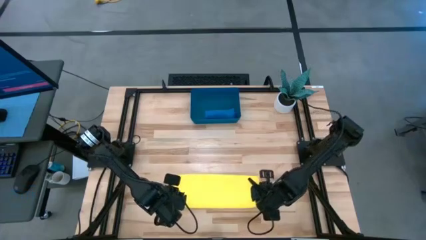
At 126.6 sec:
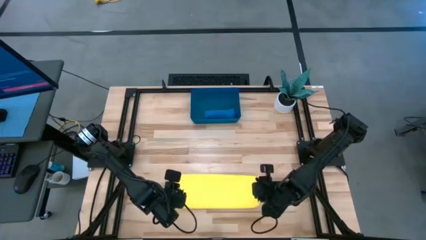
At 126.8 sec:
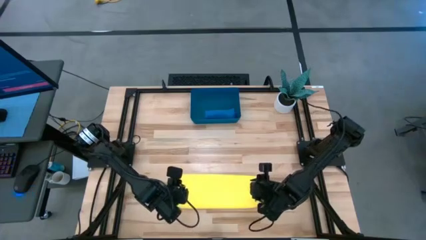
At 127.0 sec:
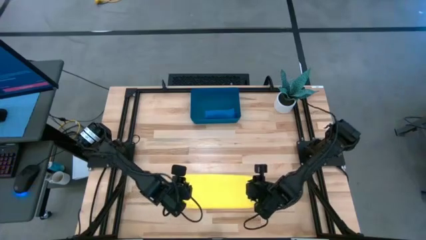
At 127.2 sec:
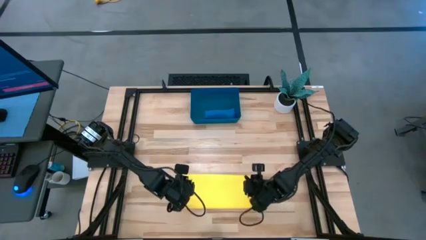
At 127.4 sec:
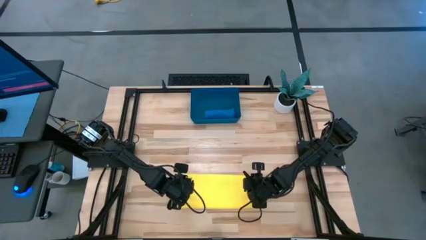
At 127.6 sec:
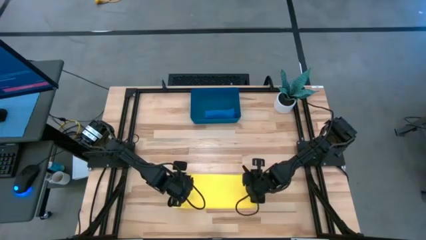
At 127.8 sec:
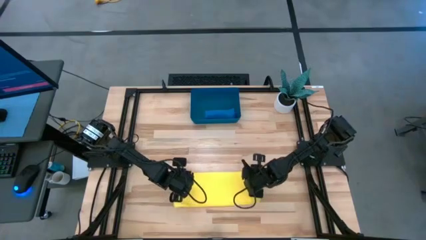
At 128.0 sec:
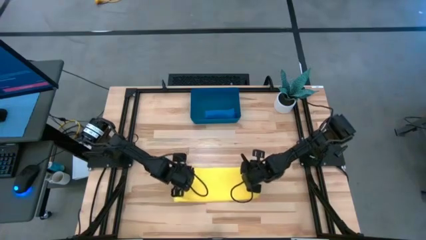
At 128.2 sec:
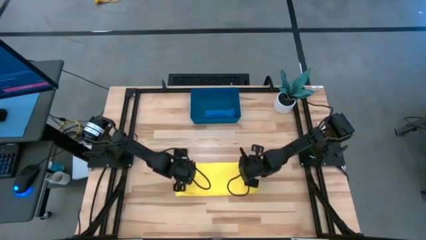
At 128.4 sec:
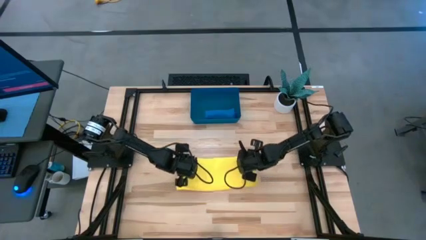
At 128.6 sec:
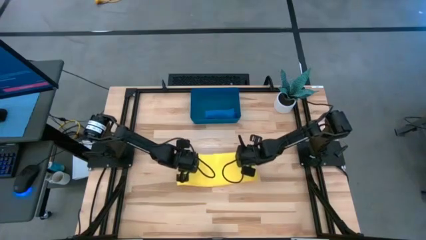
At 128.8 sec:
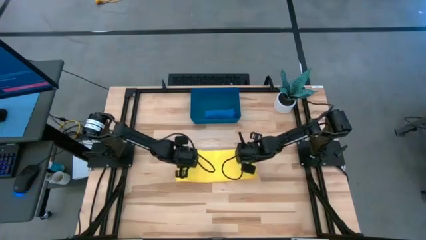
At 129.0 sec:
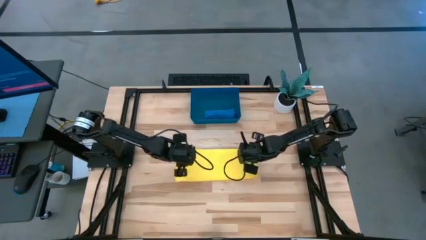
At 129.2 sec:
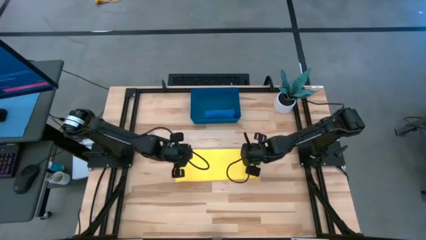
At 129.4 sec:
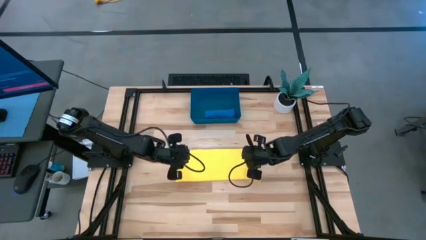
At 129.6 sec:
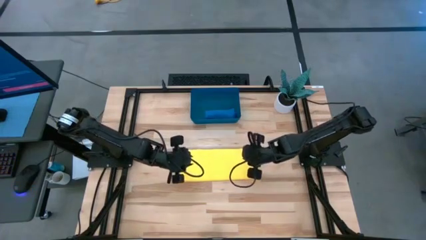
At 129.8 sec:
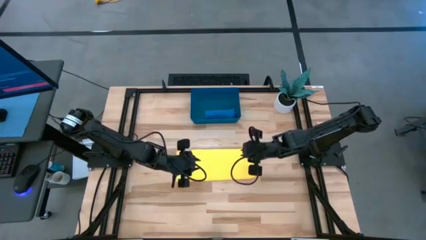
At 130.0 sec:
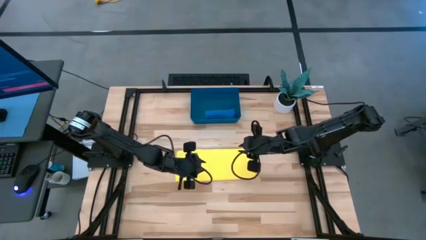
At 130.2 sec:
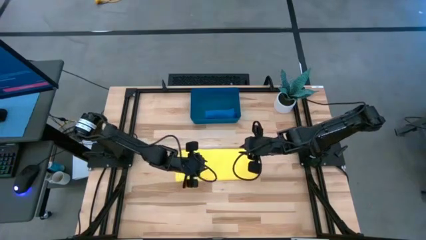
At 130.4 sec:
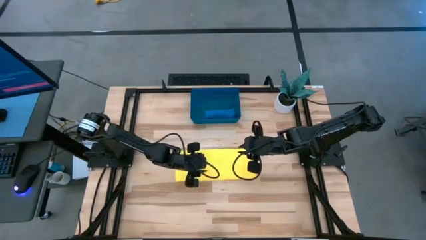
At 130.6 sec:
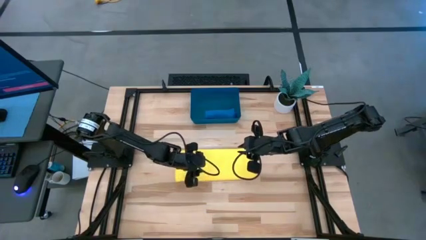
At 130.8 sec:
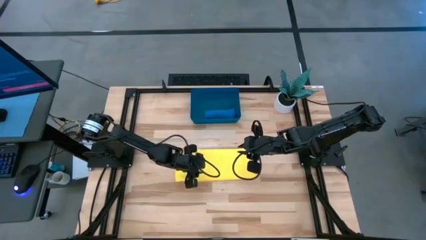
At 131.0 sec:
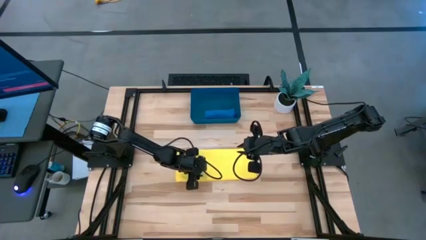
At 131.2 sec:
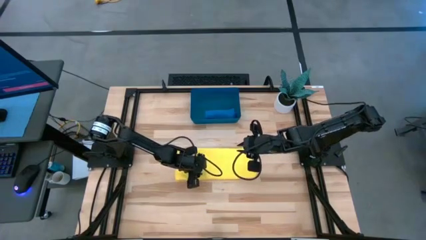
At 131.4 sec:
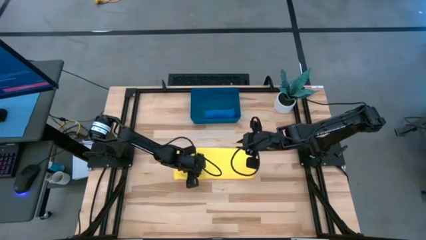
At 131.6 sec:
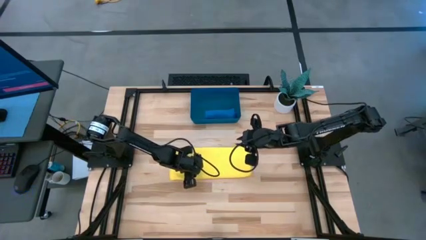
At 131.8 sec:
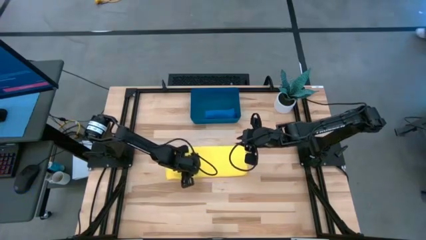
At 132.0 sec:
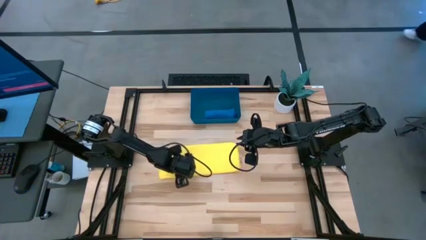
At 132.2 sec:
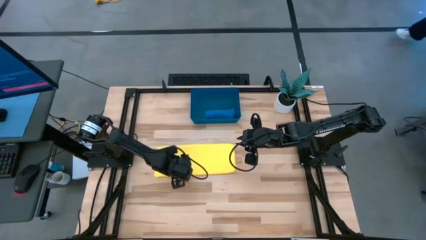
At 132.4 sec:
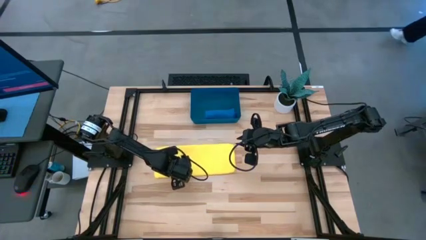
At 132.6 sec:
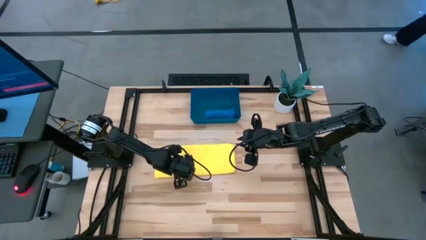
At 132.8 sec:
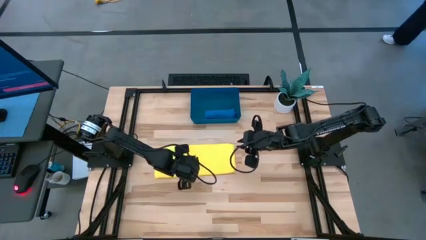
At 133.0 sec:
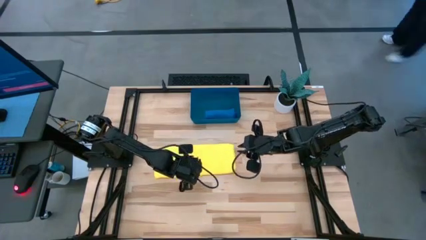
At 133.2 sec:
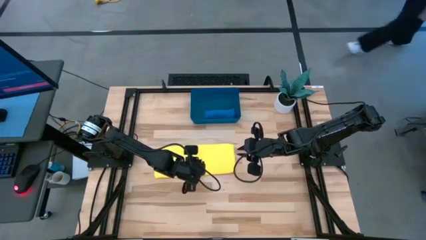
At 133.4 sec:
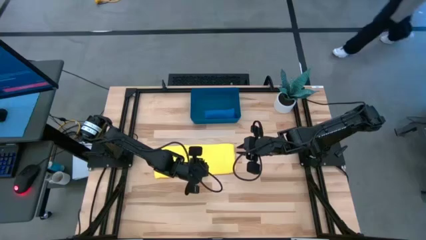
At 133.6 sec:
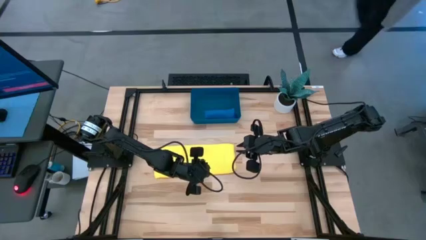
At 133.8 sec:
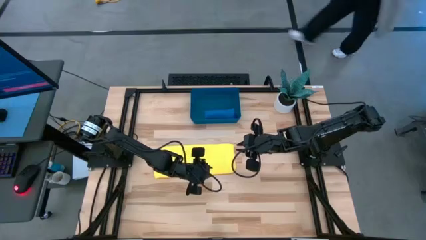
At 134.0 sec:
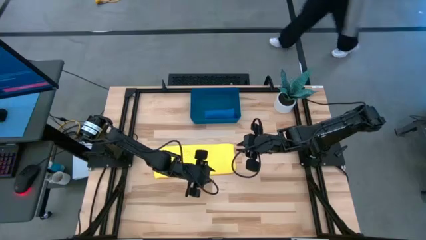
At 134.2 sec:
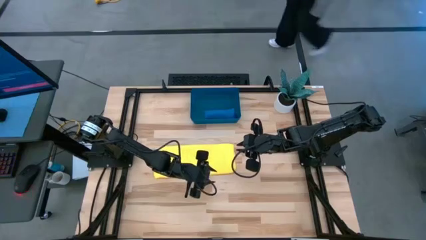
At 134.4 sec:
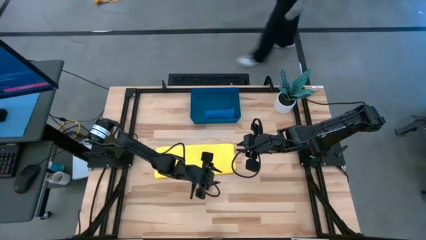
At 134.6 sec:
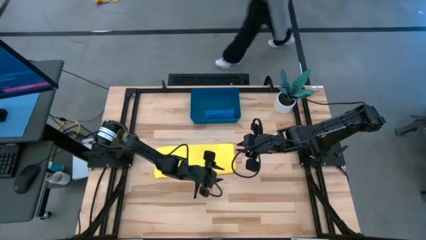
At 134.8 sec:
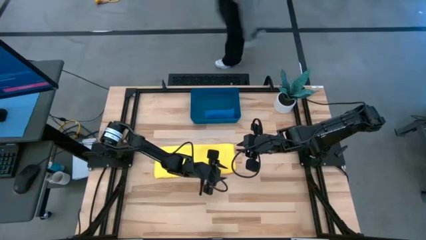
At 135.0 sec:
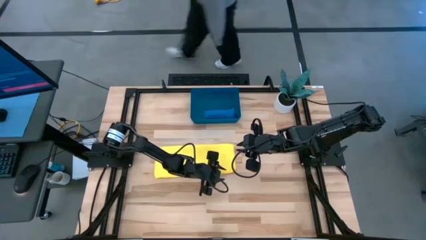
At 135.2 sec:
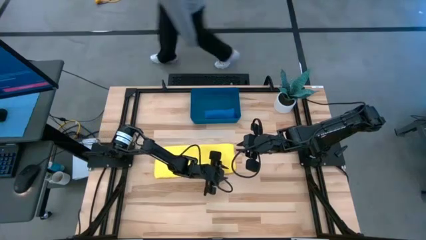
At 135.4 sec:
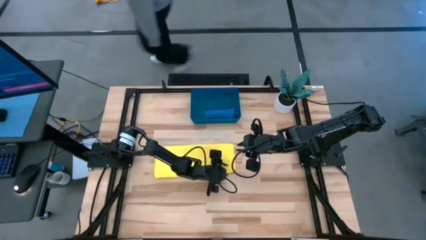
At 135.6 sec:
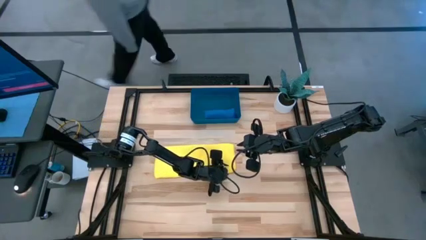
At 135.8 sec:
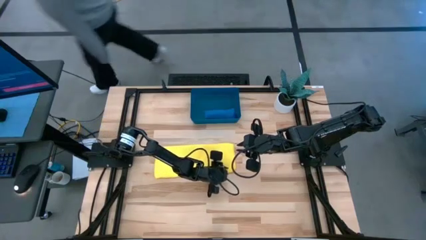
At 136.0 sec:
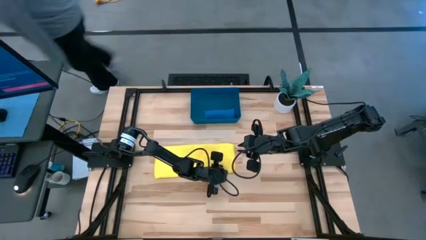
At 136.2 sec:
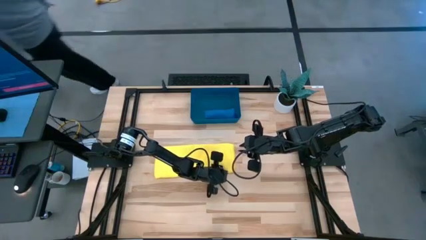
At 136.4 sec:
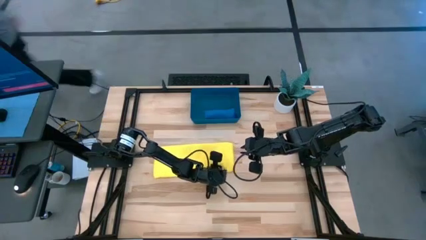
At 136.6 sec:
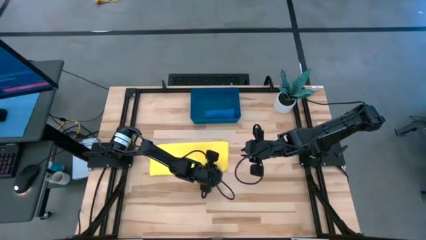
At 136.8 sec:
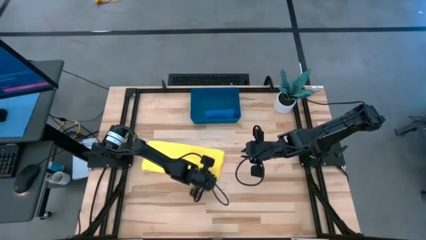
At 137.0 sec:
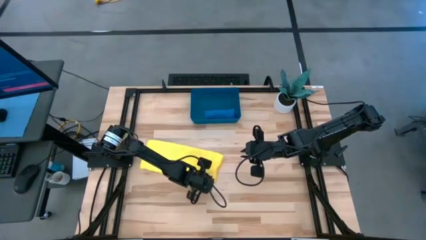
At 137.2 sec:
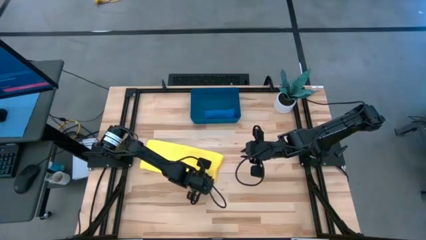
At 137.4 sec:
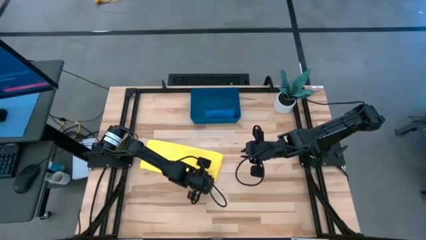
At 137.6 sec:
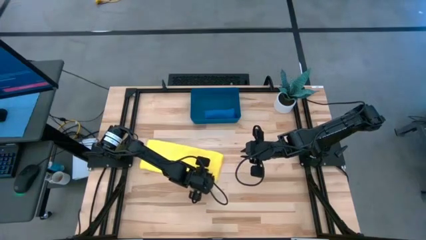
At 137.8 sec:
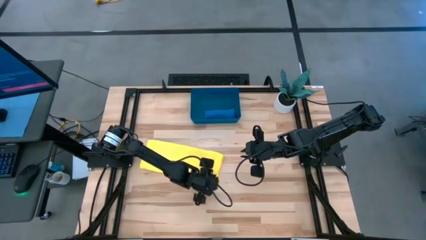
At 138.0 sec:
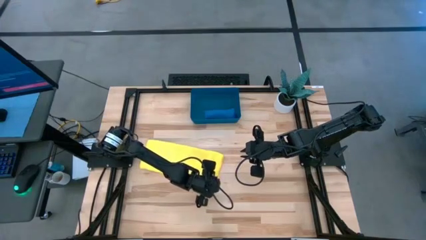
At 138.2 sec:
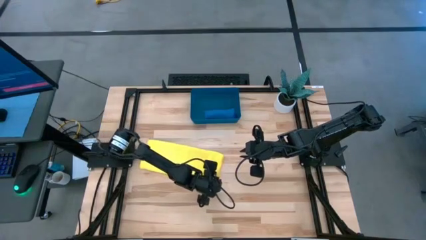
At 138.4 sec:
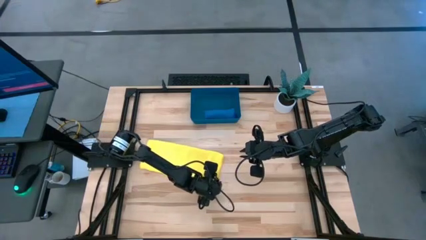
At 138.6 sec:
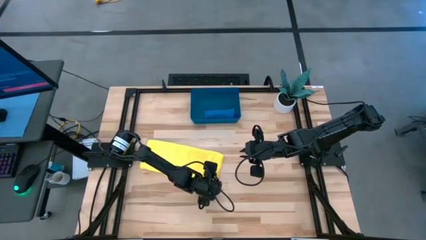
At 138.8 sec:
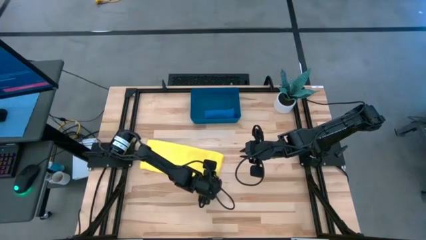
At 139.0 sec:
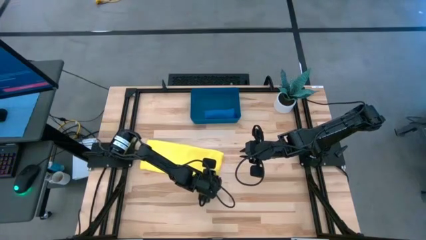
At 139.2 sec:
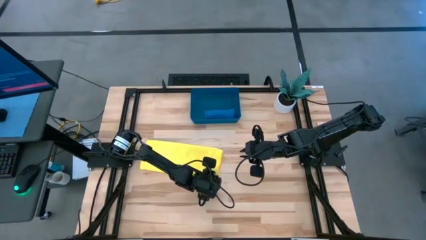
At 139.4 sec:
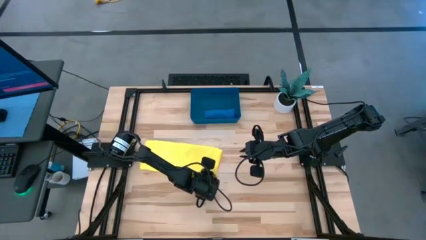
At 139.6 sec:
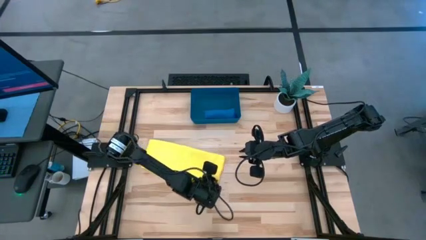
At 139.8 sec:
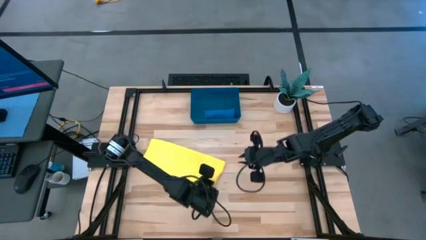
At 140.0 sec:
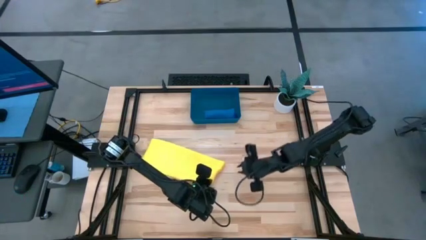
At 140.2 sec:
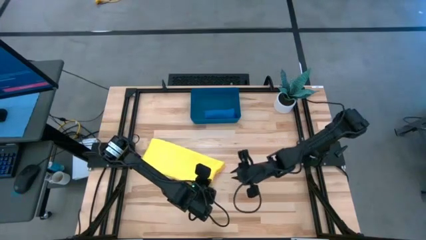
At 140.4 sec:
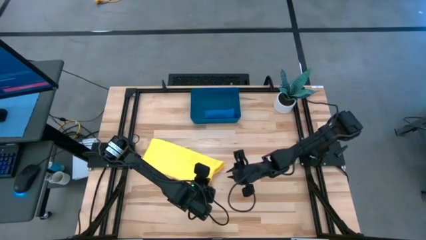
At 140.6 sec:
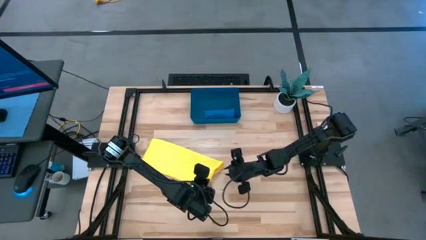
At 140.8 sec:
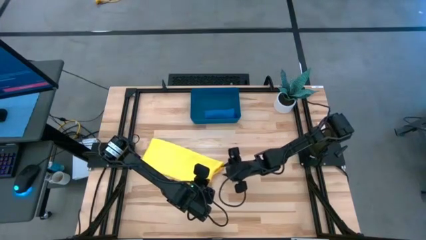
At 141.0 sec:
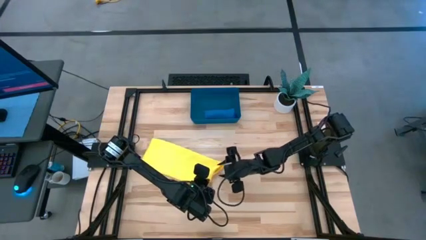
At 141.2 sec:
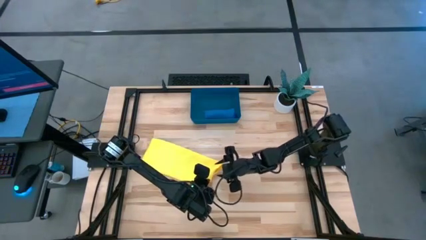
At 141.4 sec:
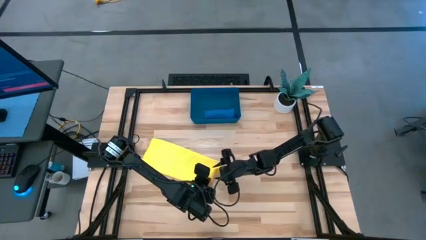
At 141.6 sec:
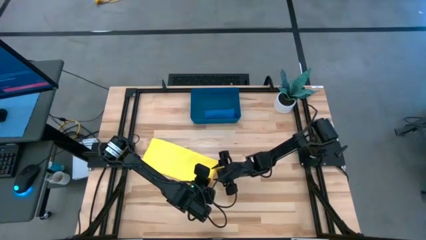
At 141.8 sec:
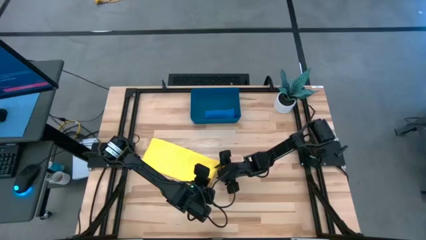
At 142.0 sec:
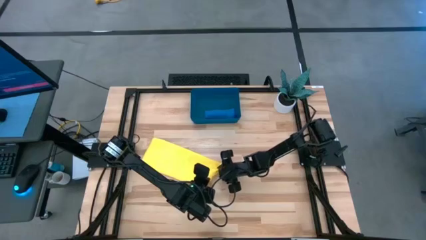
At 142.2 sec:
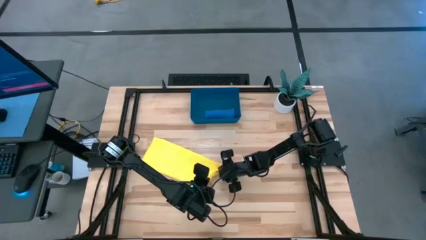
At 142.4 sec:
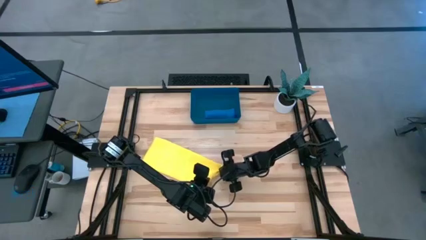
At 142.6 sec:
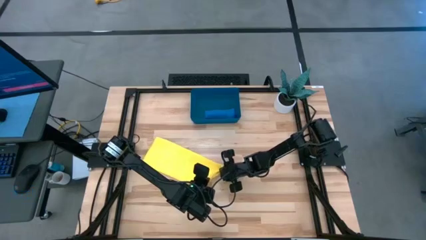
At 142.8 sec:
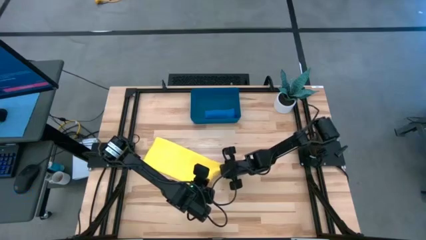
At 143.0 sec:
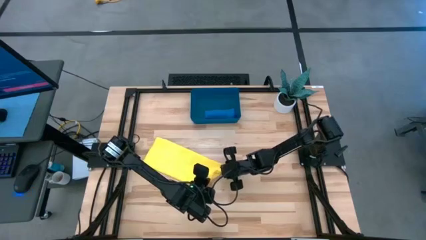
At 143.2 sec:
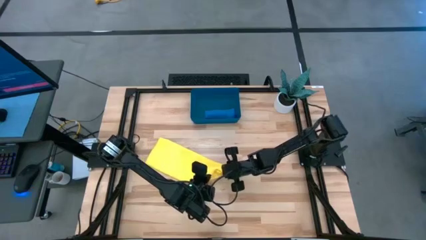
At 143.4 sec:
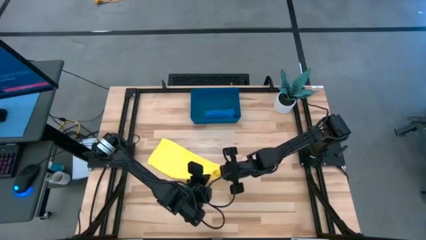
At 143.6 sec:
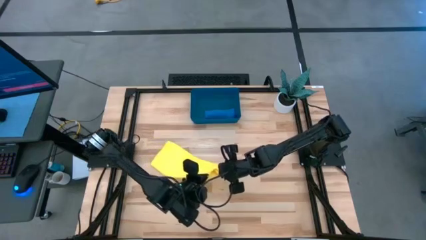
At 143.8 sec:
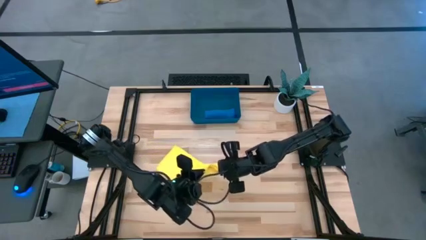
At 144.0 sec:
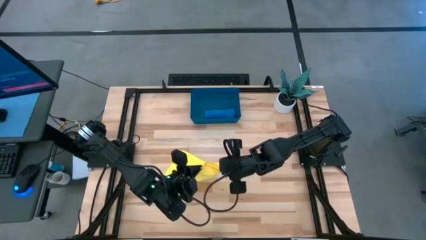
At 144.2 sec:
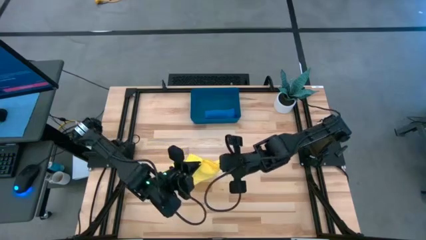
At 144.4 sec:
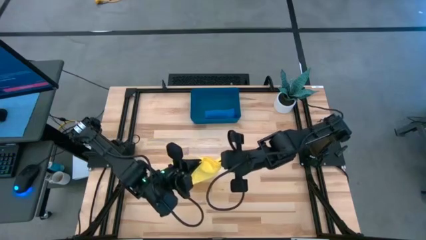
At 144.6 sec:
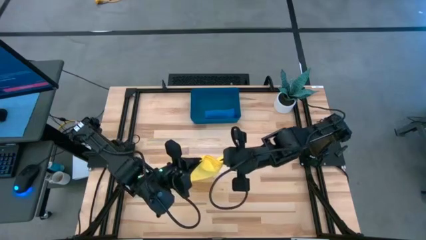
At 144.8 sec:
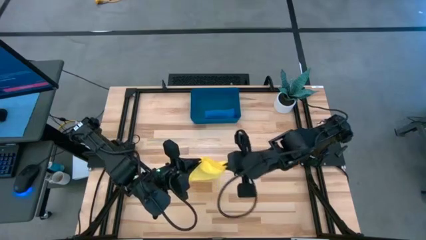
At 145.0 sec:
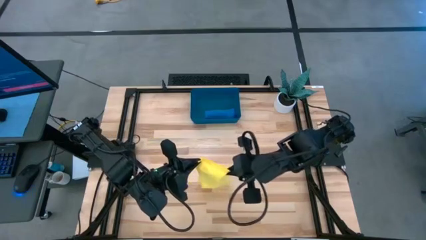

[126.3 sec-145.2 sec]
Task: Roll microfiber towels into tight, uniform cylinder then place into a basket
Fold the yellow towel
